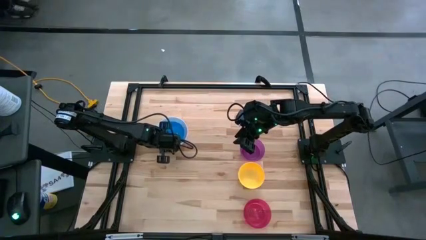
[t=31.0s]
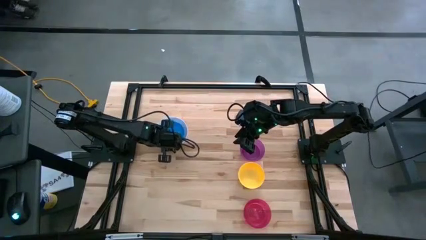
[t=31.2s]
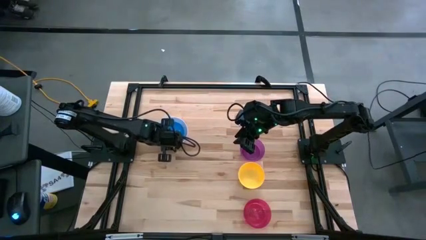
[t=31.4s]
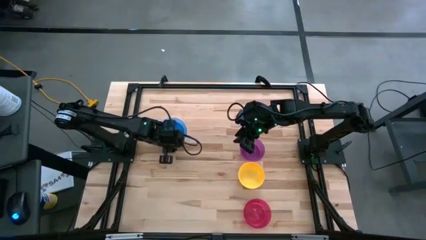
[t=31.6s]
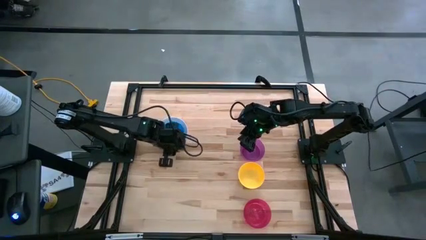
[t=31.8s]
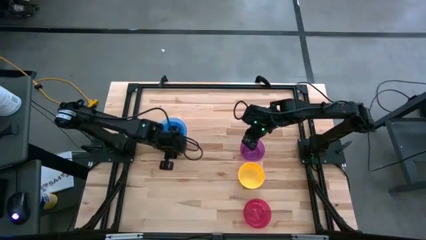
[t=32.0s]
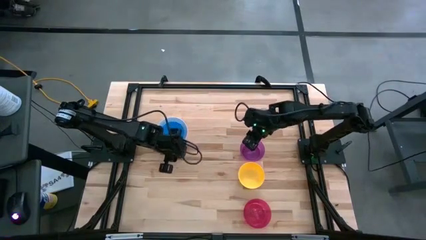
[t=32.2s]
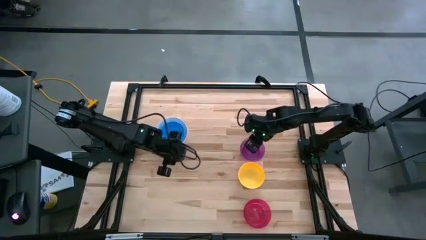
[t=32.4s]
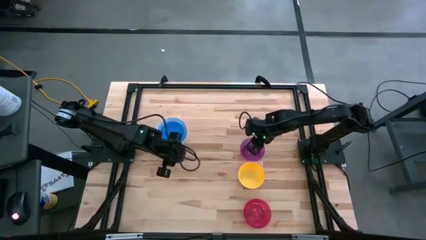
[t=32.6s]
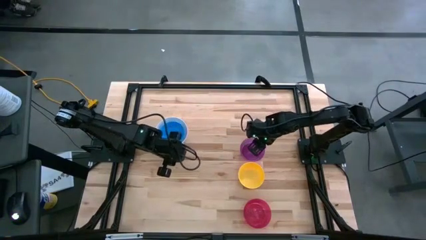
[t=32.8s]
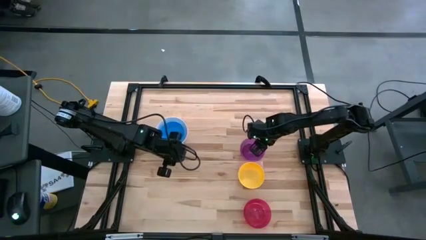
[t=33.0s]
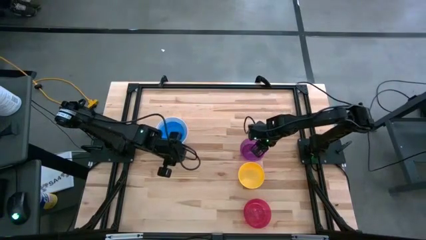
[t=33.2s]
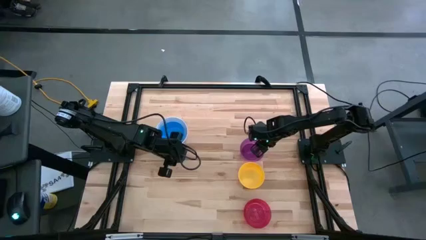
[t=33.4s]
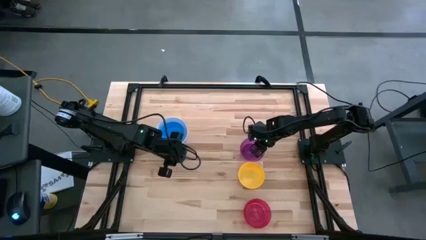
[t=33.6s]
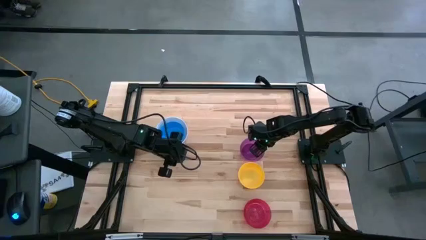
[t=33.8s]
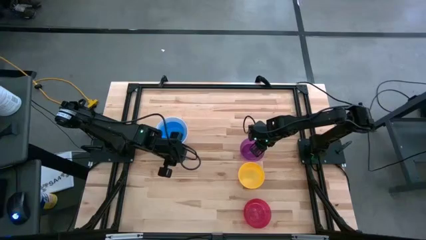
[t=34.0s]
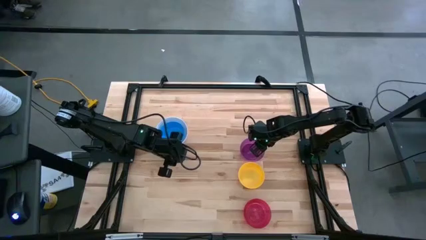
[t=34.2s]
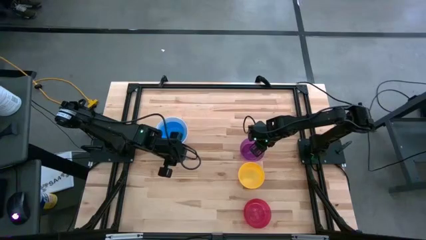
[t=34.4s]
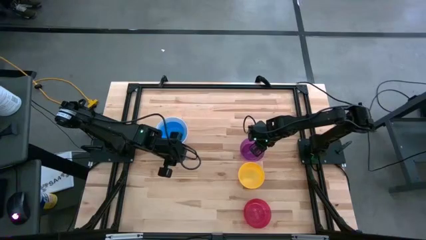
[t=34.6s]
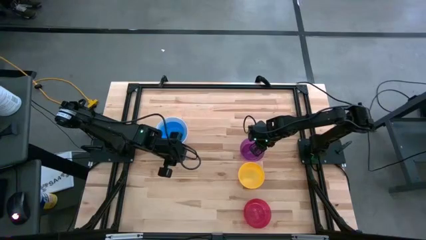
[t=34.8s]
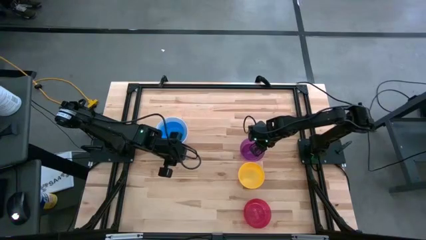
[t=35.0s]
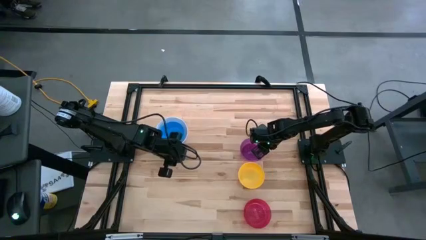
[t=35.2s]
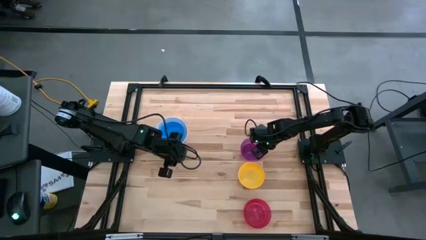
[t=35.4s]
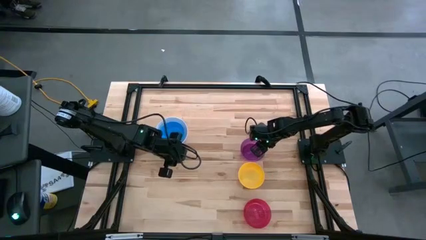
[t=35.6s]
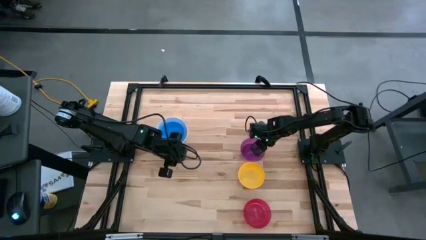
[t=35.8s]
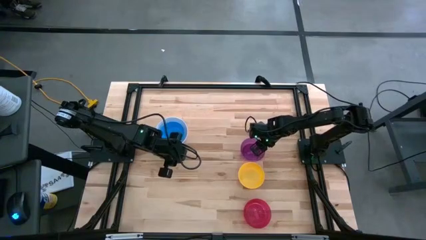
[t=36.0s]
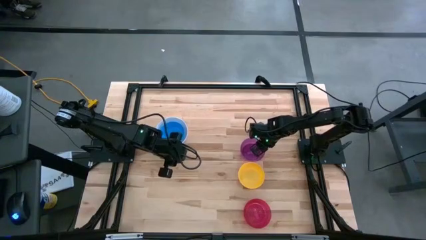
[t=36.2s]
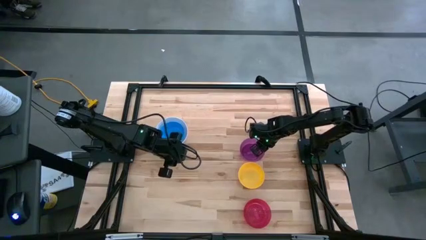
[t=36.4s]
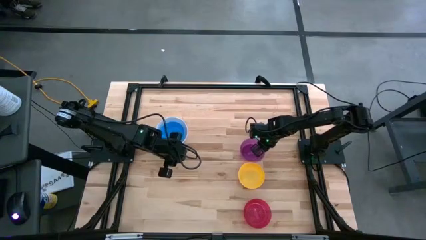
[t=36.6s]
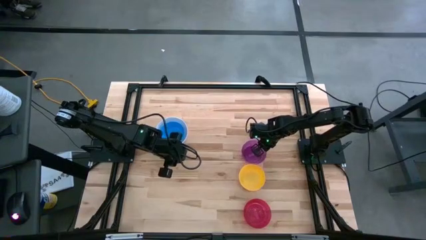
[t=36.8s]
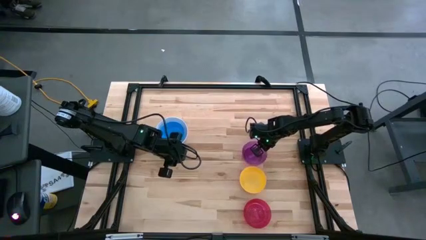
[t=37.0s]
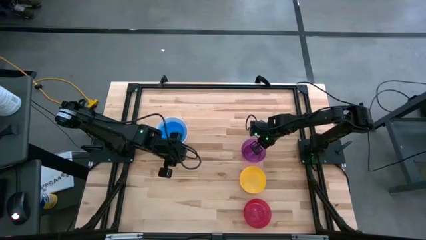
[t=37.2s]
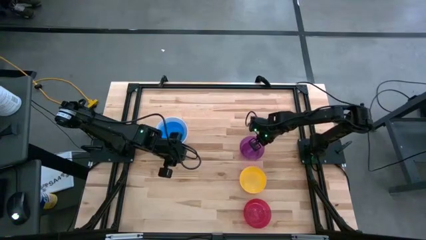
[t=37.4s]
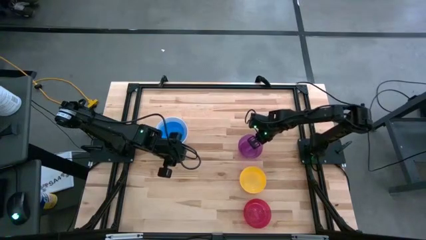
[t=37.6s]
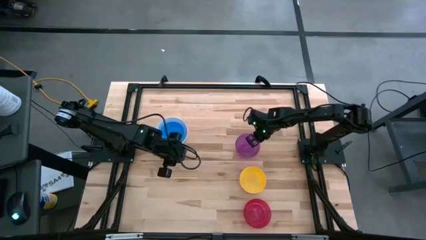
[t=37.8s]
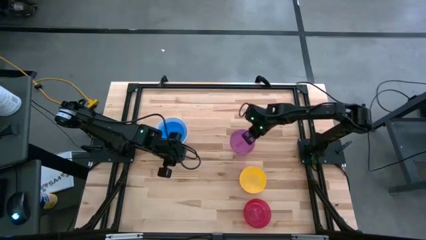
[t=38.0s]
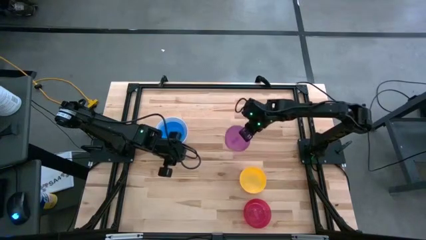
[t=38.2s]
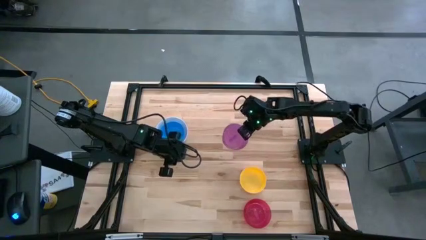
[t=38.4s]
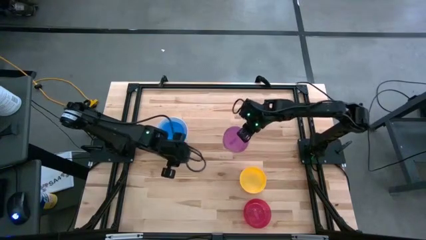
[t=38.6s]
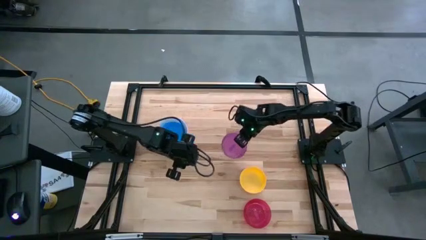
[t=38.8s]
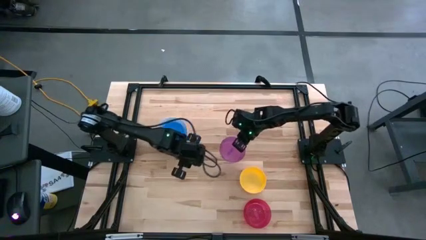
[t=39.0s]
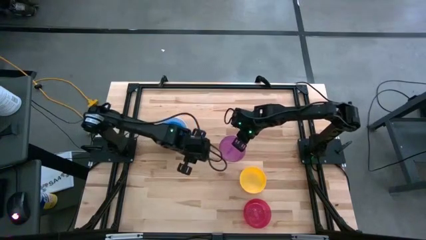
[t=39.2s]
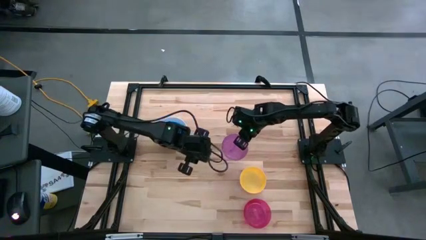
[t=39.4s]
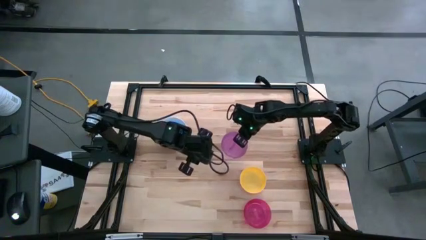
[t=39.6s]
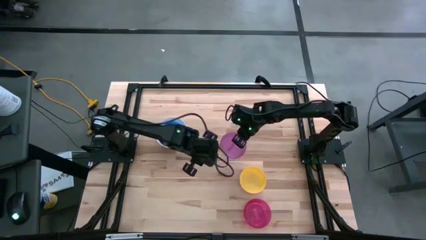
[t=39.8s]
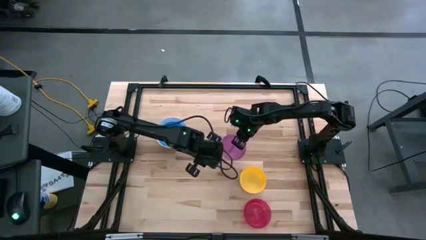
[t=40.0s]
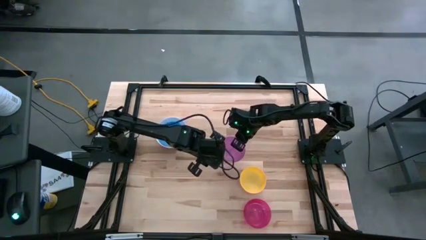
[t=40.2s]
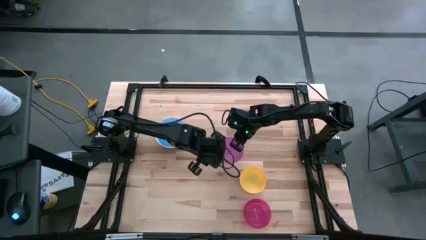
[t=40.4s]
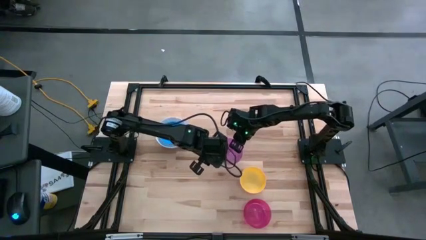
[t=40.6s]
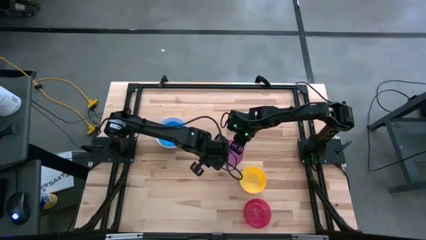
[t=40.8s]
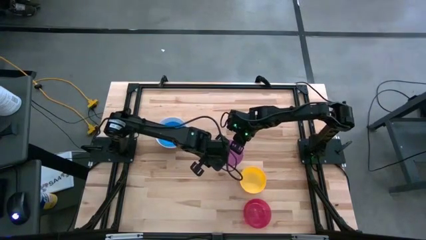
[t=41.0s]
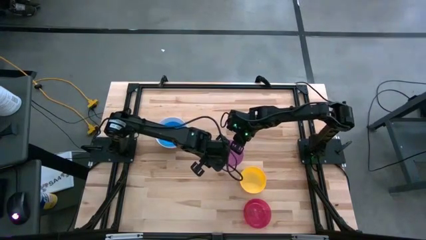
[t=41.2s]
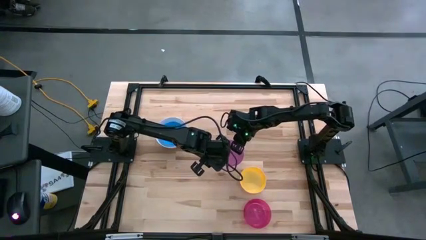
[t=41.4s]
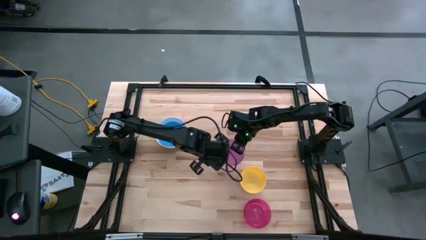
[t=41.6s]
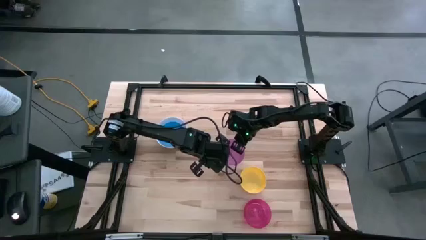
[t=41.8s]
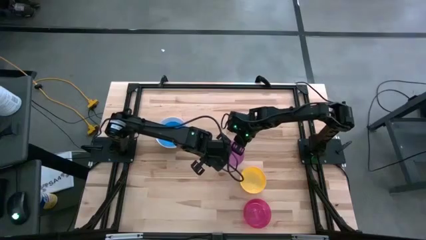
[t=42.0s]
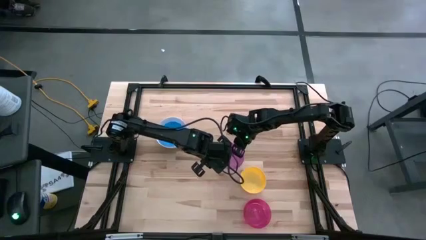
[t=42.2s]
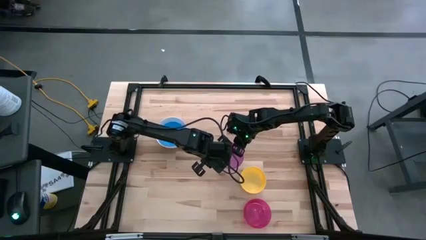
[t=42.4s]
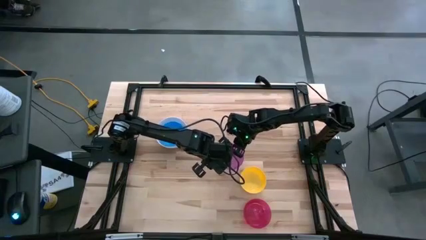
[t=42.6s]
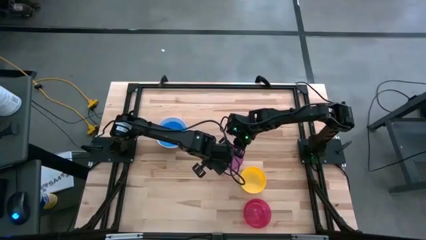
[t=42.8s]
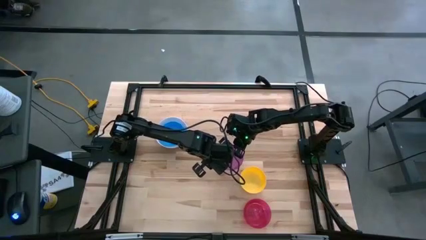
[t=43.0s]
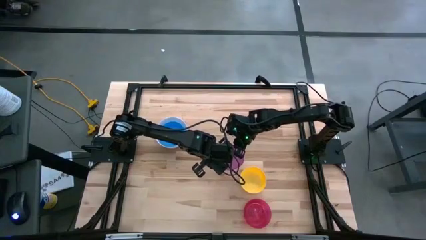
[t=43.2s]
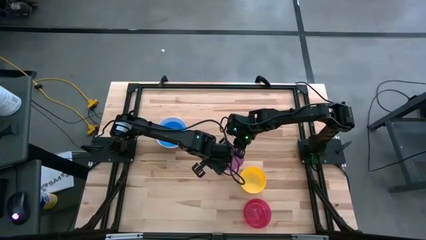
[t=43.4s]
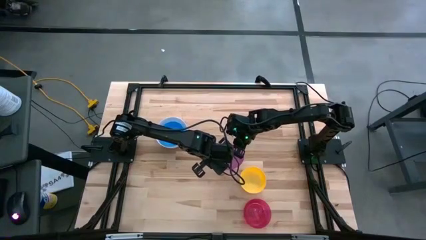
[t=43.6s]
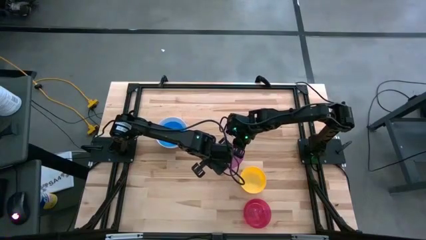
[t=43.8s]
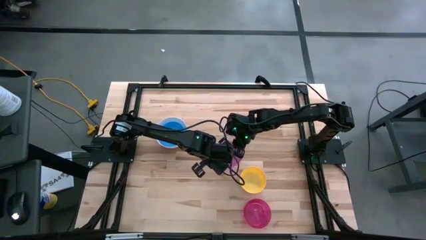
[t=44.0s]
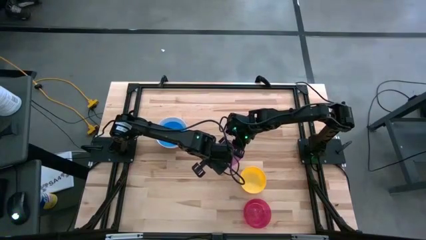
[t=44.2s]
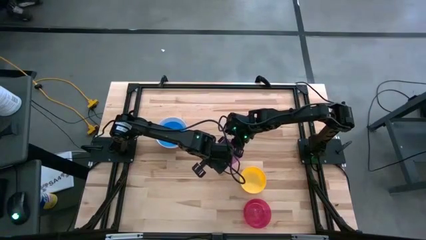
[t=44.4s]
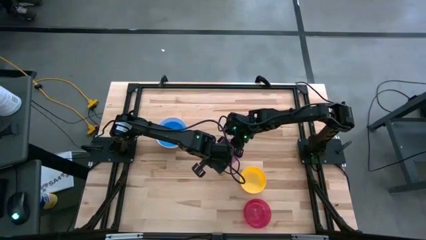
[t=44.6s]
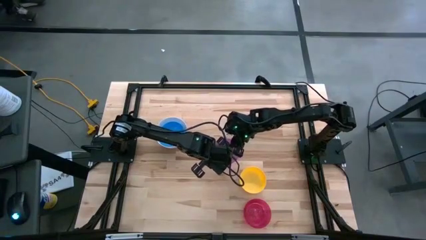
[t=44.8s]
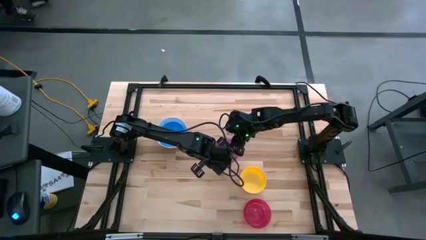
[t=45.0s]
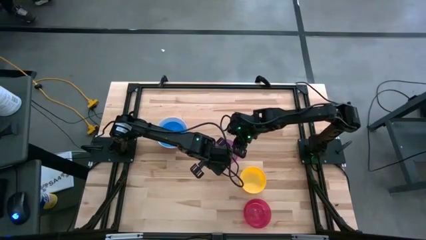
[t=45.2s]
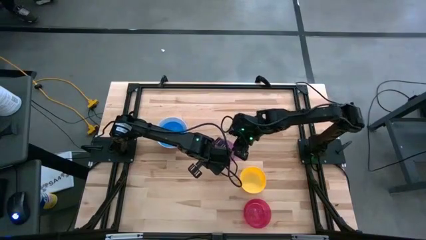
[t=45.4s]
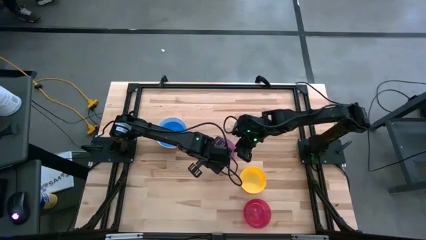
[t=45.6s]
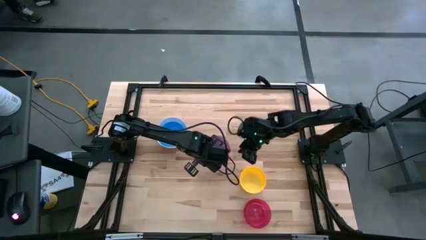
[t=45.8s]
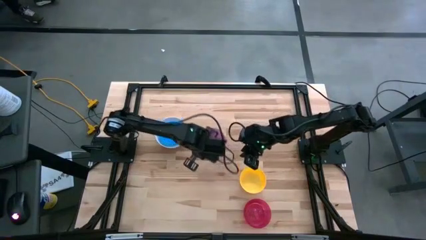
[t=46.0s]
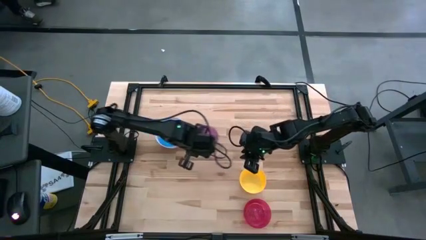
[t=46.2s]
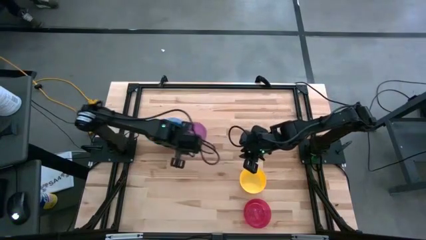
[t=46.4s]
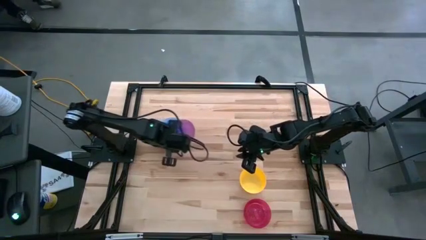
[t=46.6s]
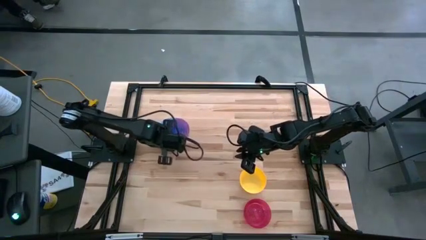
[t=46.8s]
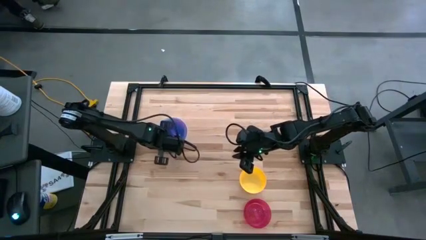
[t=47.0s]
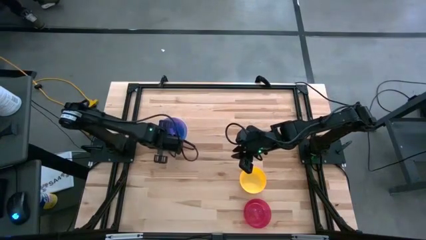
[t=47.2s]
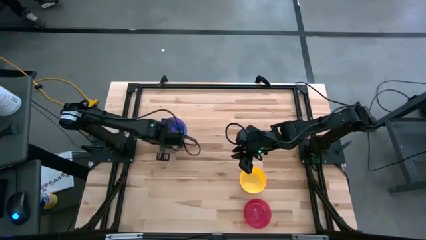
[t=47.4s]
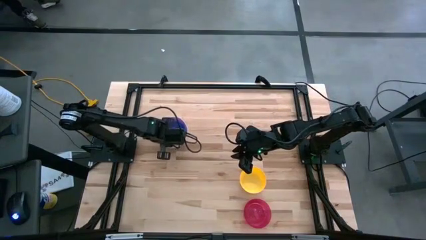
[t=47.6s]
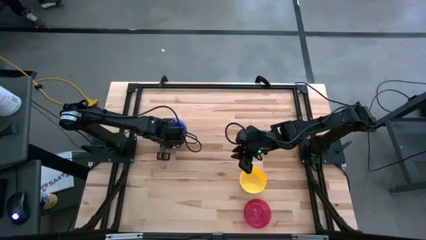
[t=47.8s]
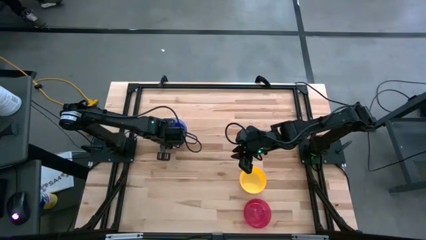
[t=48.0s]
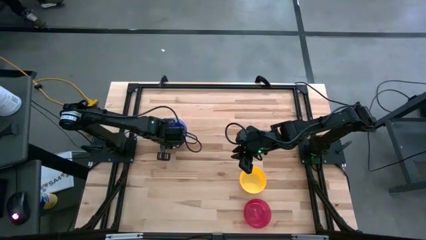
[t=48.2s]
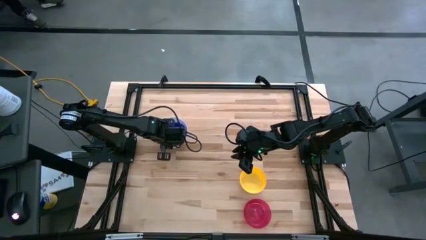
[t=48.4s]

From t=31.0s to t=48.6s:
Stack the purple bowl on the blue bowl
